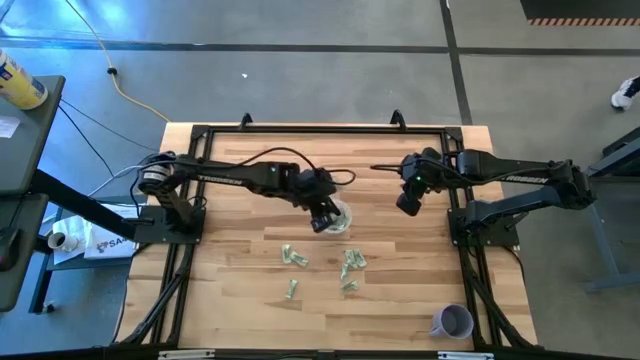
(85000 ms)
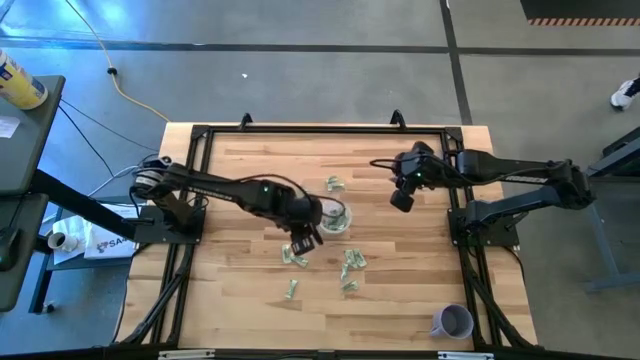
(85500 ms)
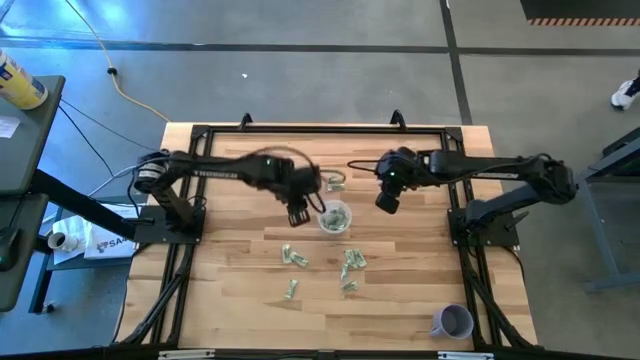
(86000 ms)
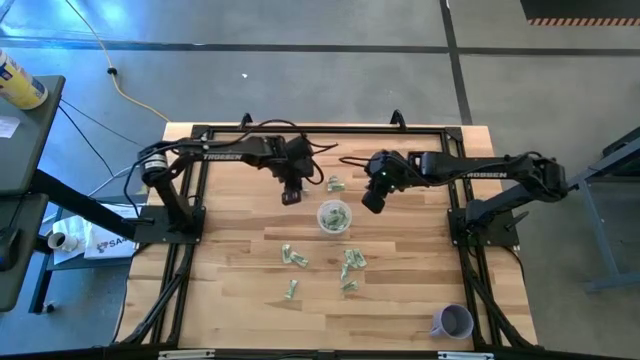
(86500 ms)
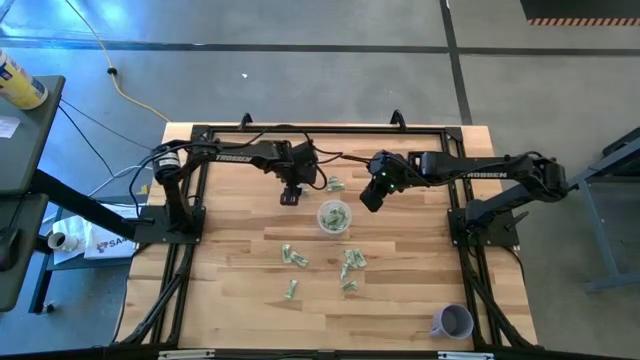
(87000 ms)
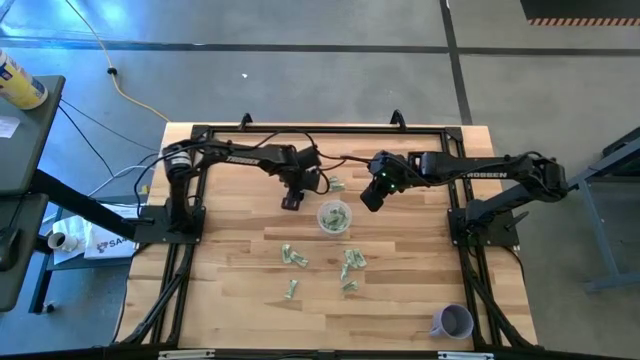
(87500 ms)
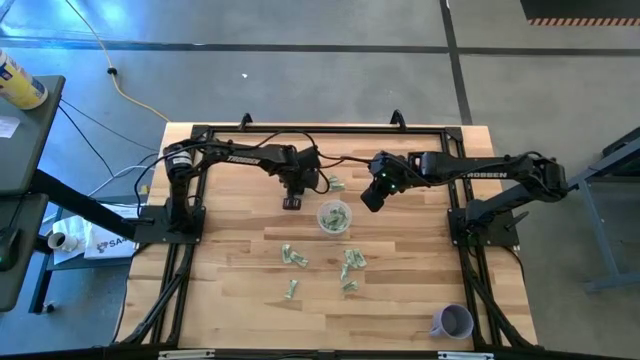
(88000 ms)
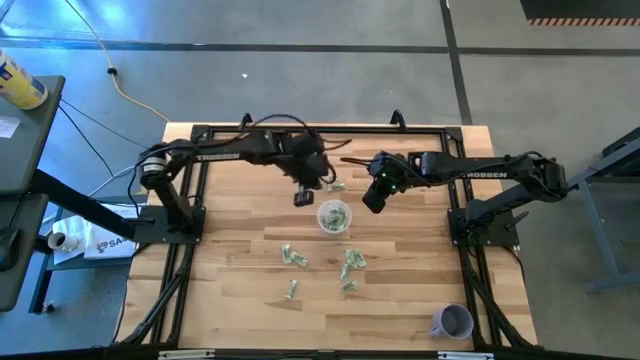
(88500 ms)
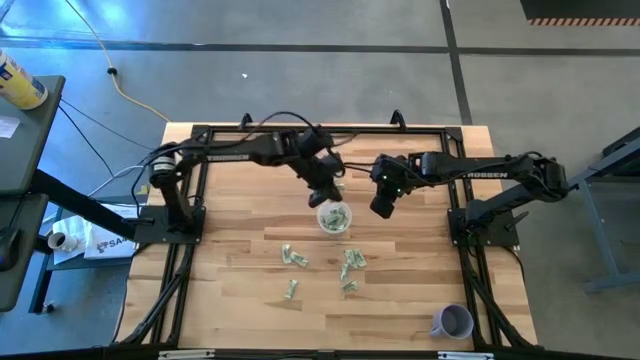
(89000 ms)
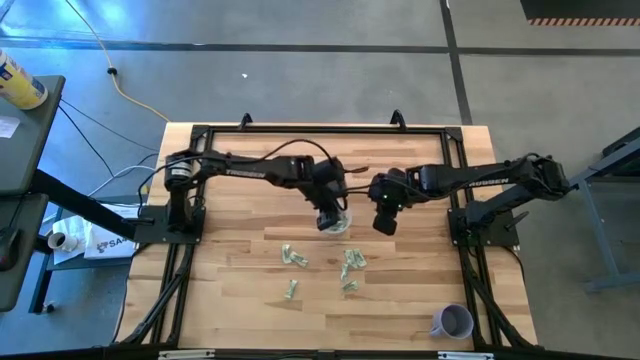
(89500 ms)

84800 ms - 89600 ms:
Task: Pick and place Stevia / Truvia into bins
Put the white stevia packet into the transparent container

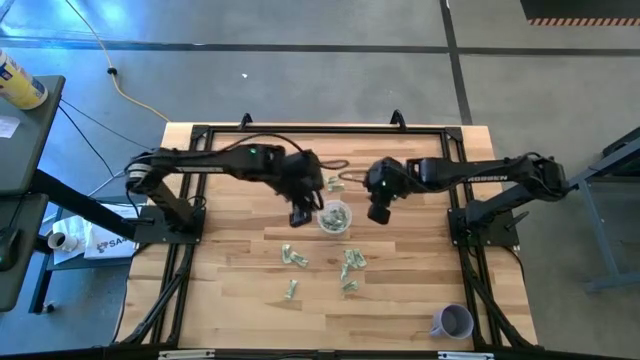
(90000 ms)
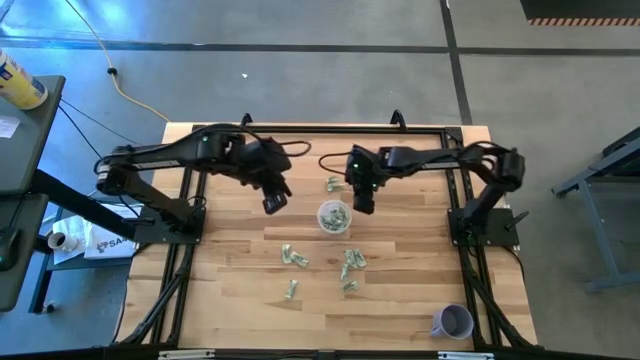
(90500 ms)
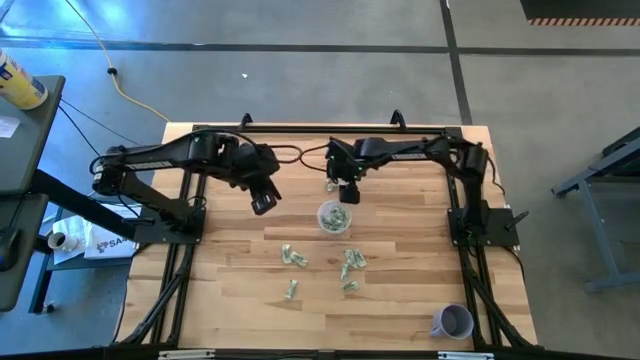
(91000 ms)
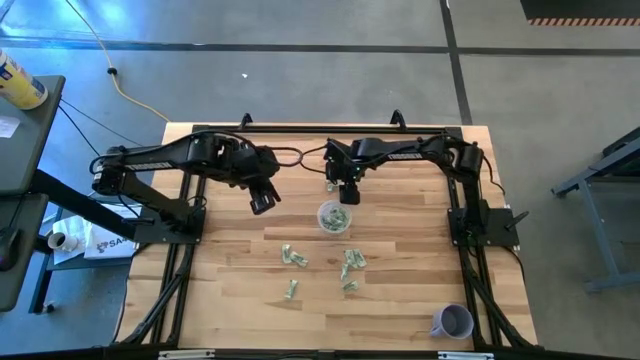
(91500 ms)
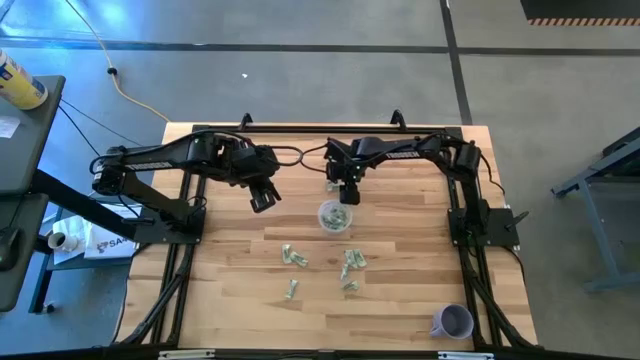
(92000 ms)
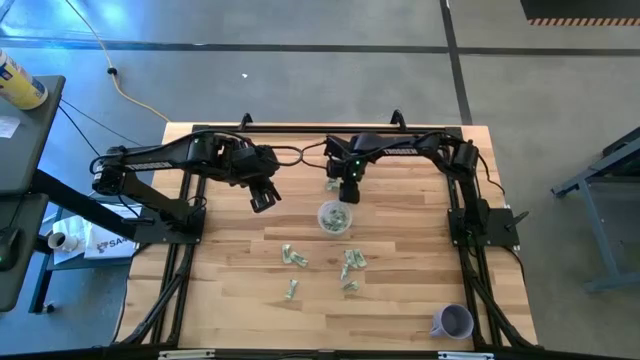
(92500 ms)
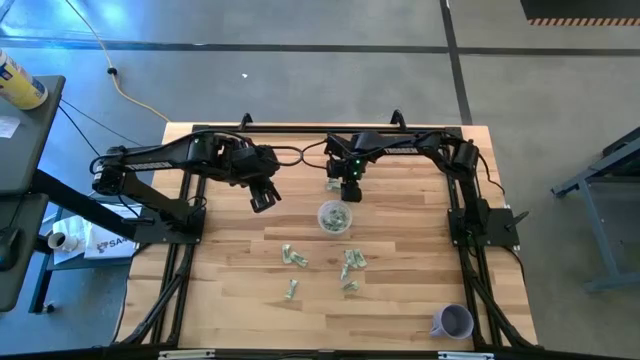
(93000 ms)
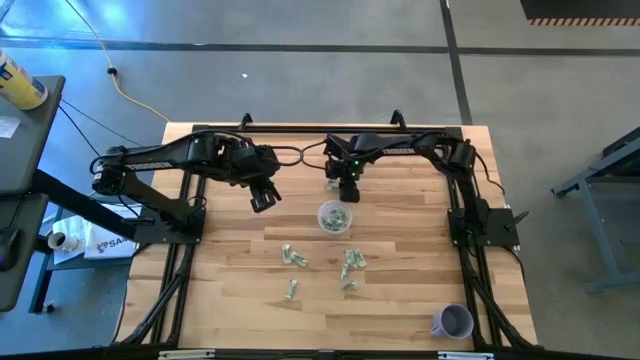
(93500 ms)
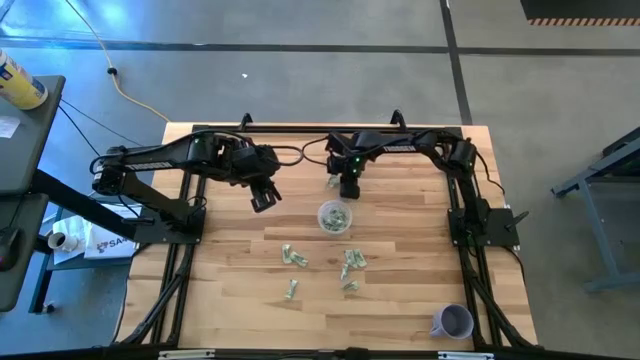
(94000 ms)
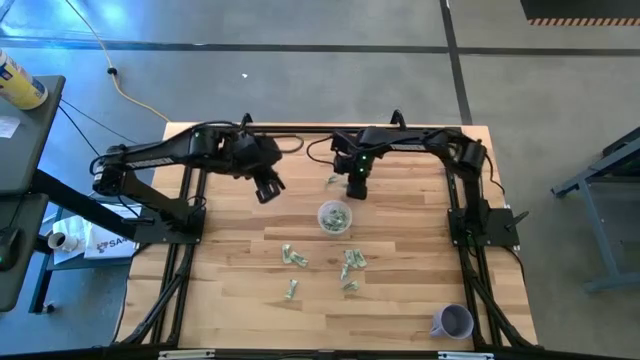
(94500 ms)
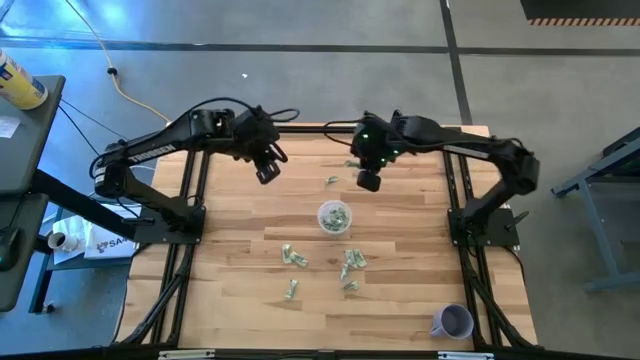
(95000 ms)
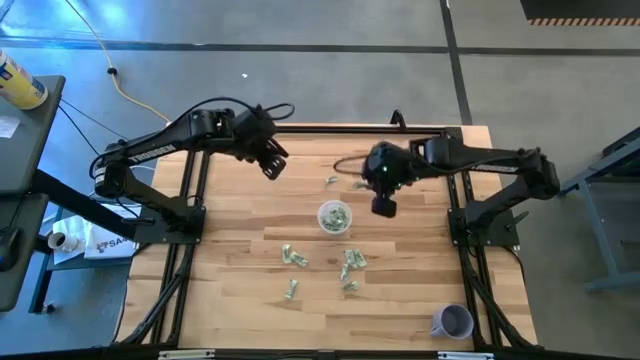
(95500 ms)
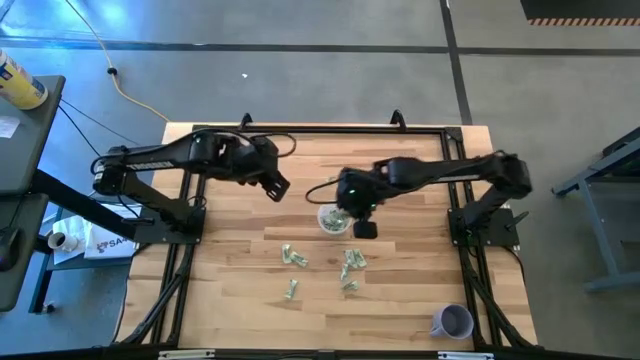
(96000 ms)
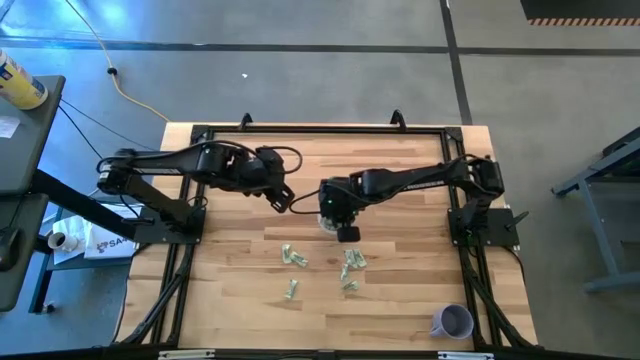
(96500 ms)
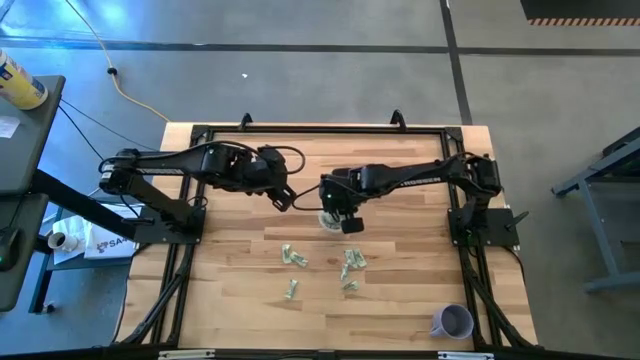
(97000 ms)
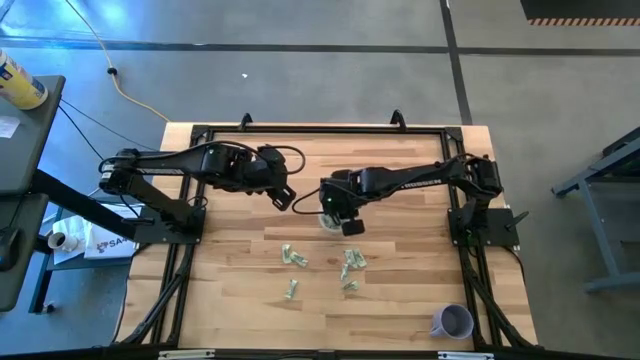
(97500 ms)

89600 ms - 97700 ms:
Put the white stevia packet into the transparent container

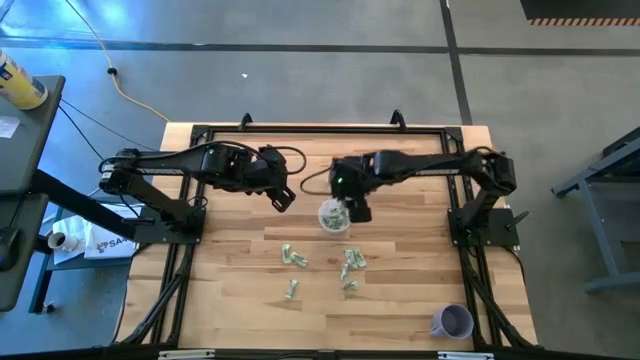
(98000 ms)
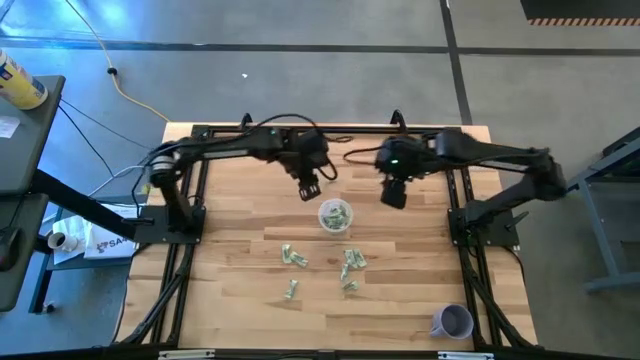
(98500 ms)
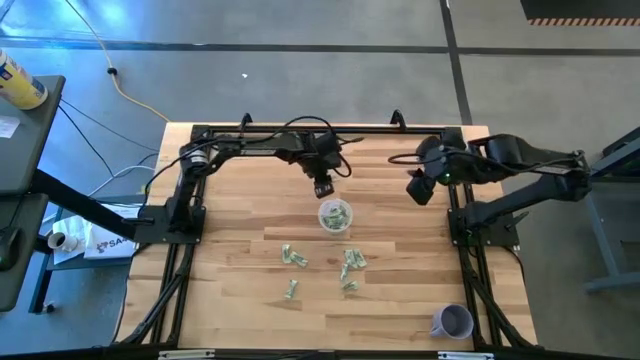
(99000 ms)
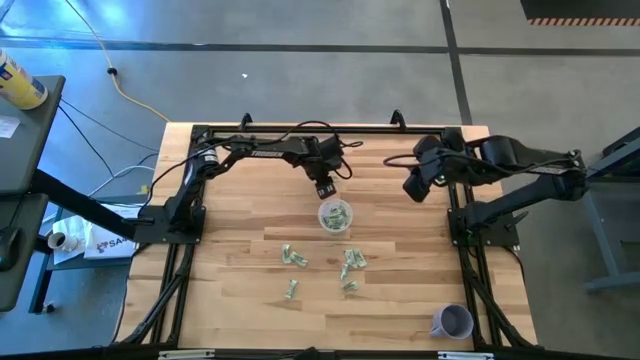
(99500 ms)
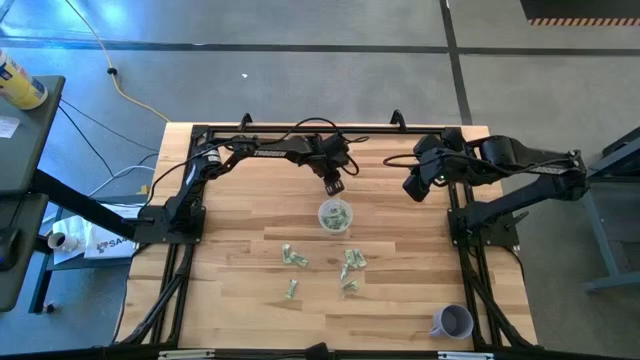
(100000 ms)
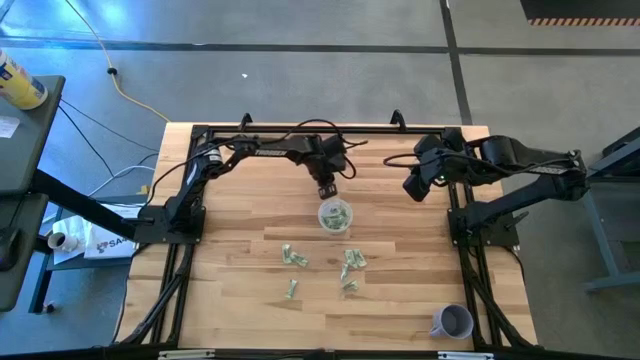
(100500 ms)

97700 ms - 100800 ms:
Put the white stevia packet into the transparent container

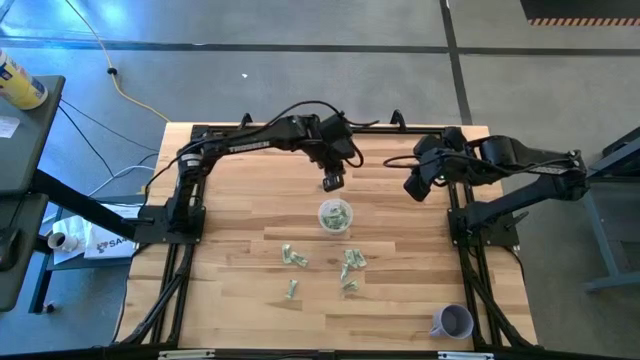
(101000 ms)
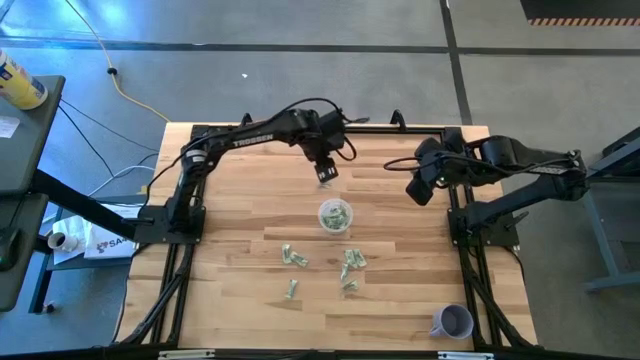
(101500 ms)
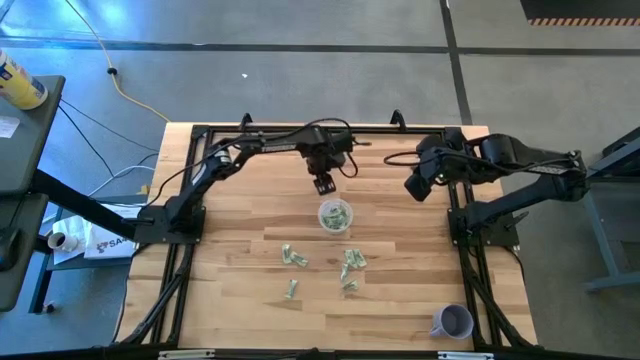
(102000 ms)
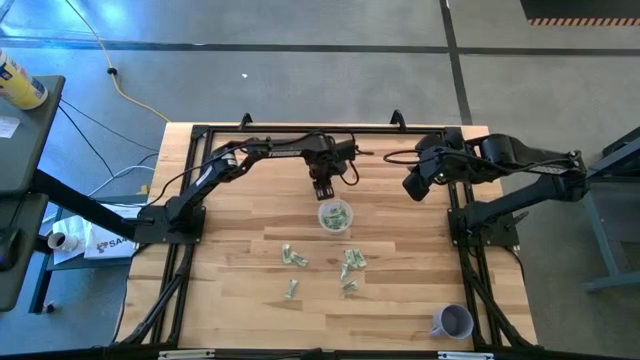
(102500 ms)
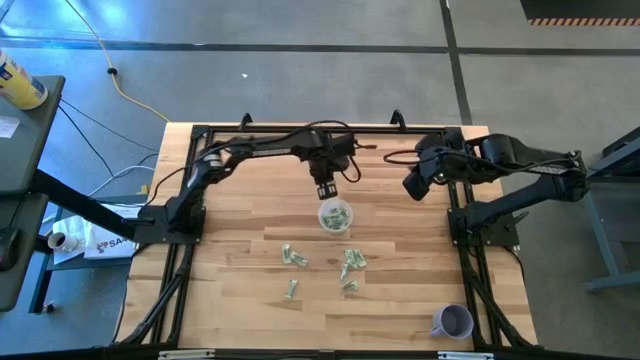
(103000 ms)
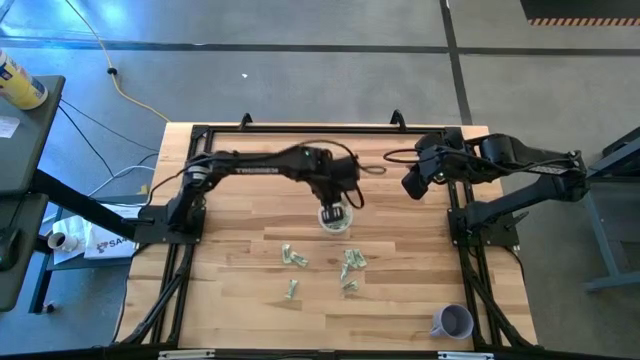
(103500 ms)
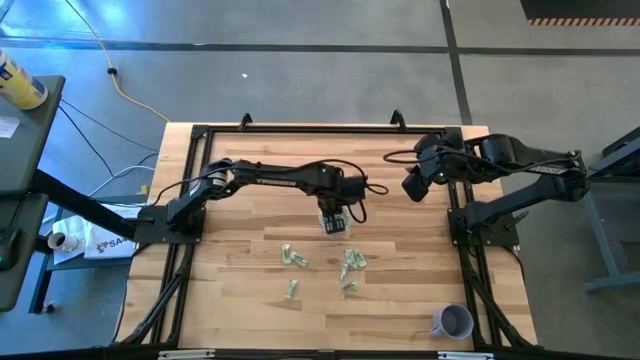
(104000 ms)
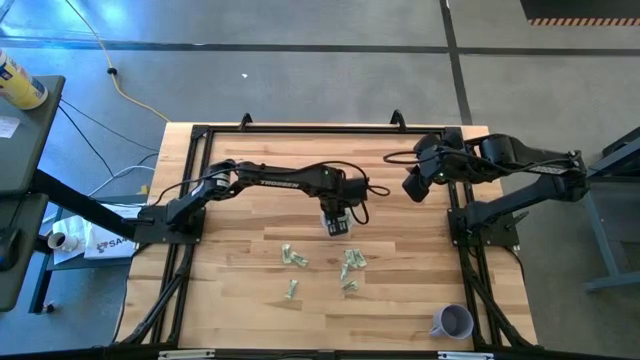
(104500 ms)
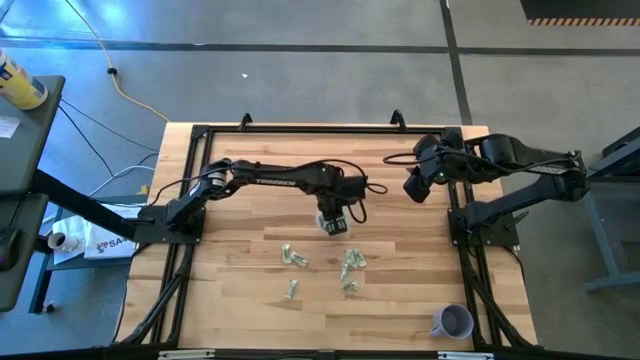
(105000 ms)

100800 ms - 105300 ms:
Put the white stevia packet into the transparent container

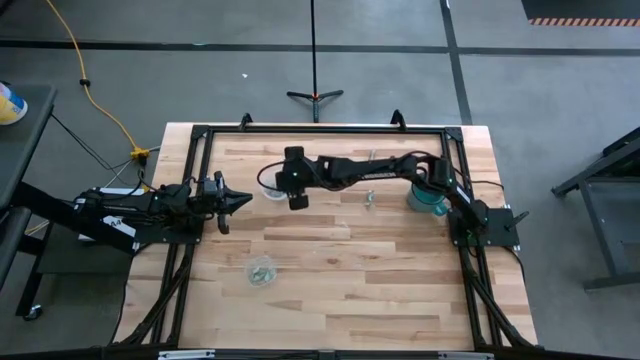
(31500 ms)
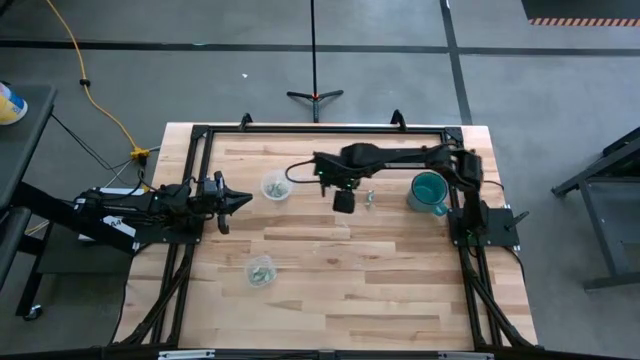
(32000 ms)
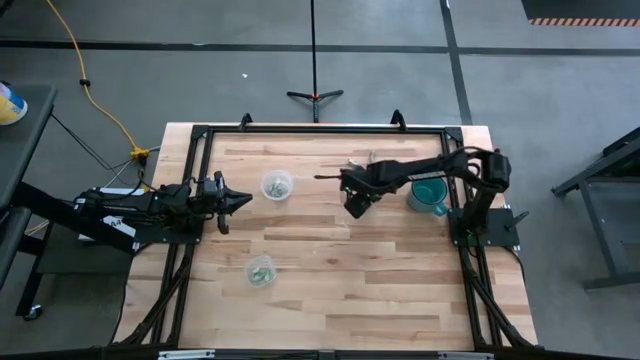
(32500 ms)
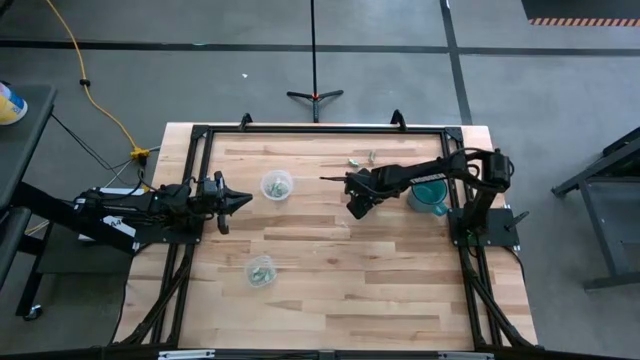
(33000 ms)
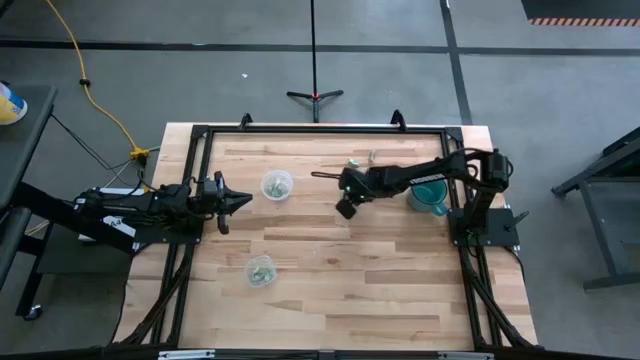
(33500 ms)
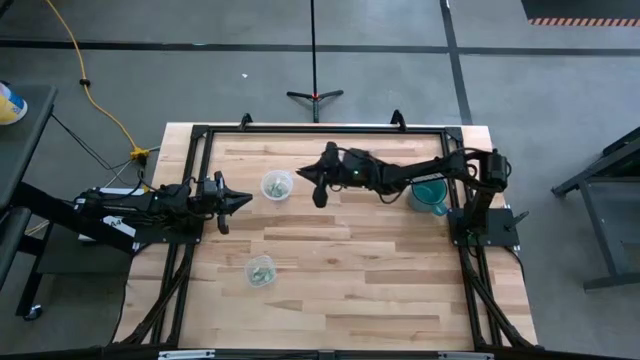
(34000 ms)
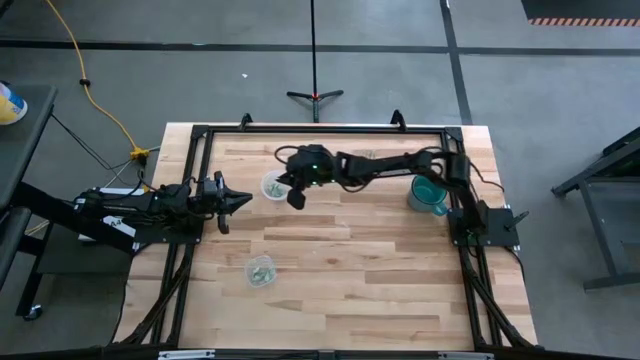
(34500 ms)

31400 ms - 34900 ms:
Task: Pick and place items into bin
Put the white stevia packet into the top transparent bin
